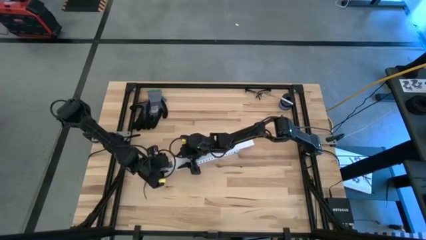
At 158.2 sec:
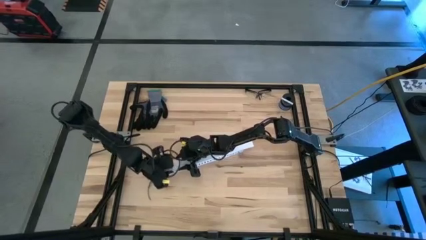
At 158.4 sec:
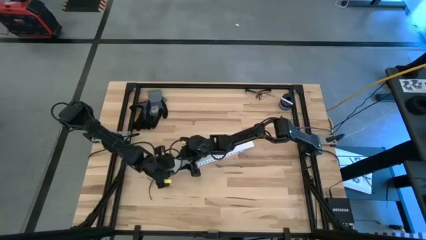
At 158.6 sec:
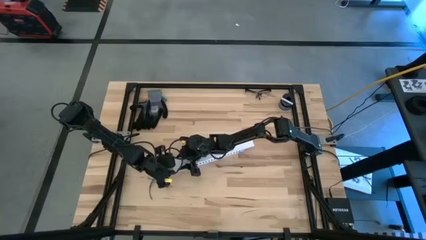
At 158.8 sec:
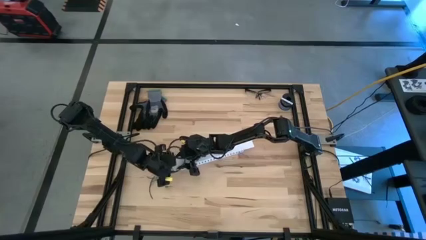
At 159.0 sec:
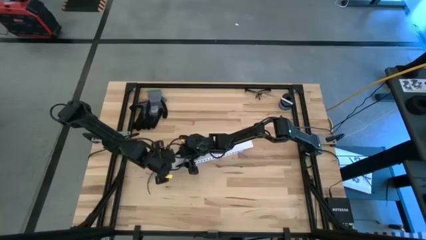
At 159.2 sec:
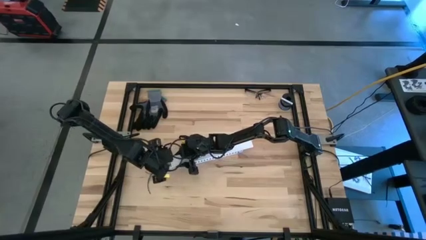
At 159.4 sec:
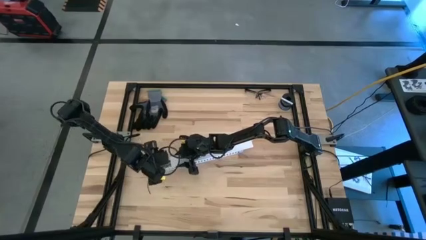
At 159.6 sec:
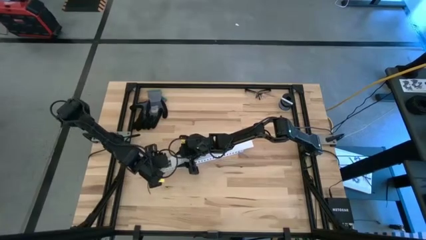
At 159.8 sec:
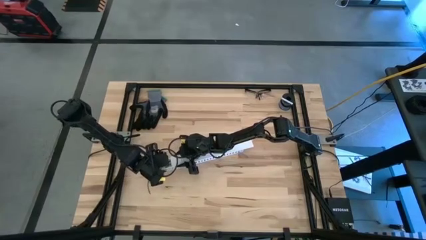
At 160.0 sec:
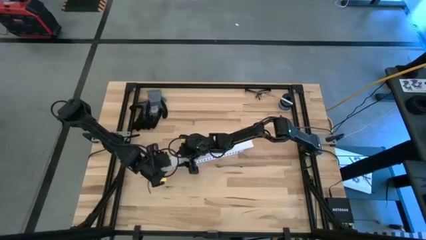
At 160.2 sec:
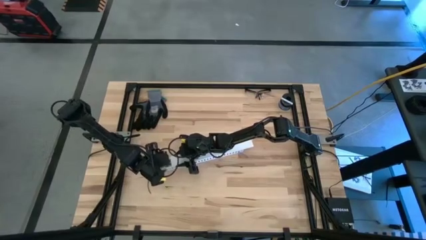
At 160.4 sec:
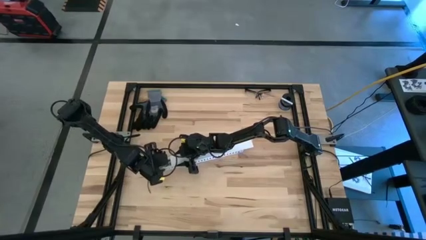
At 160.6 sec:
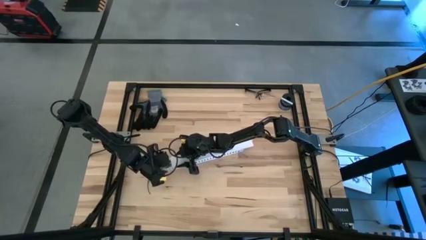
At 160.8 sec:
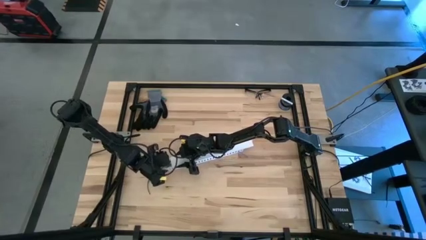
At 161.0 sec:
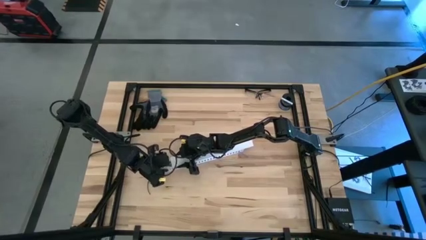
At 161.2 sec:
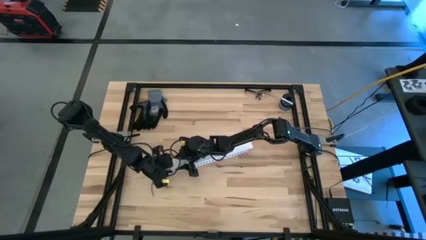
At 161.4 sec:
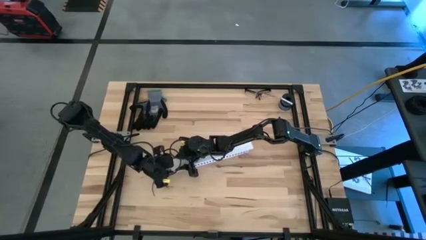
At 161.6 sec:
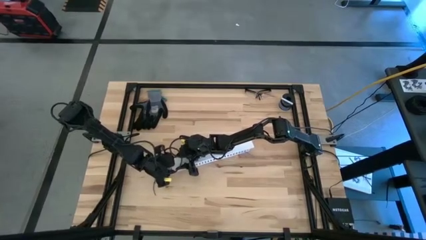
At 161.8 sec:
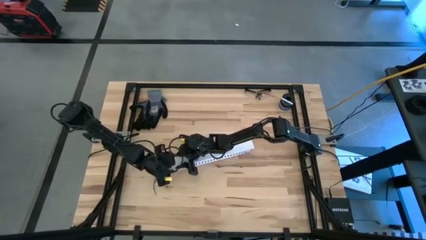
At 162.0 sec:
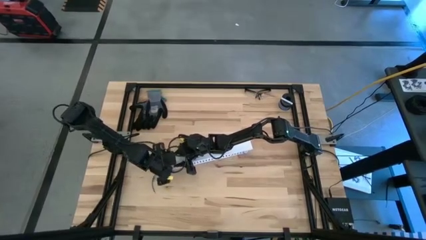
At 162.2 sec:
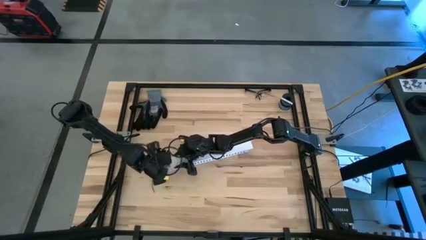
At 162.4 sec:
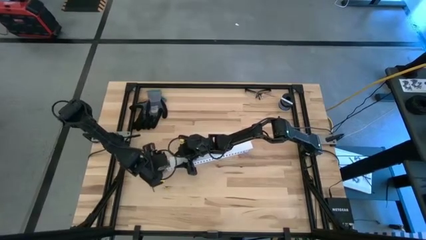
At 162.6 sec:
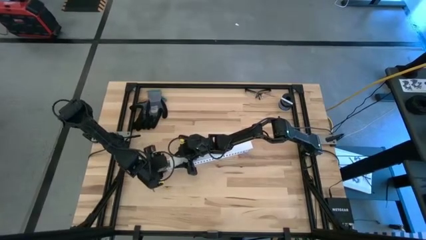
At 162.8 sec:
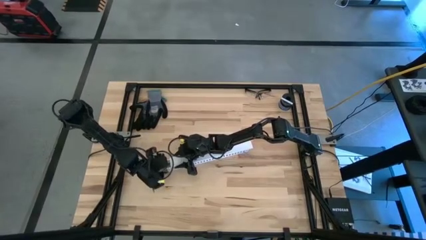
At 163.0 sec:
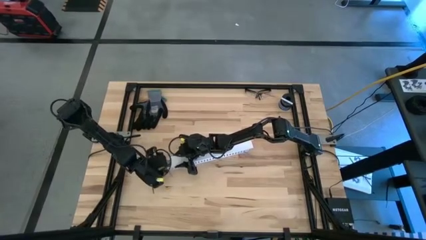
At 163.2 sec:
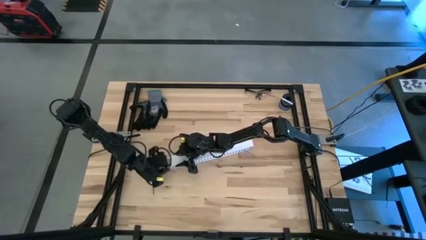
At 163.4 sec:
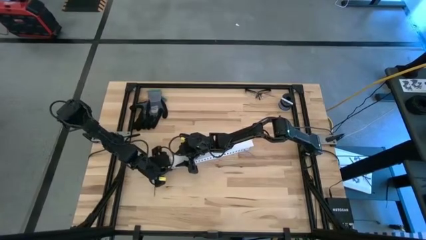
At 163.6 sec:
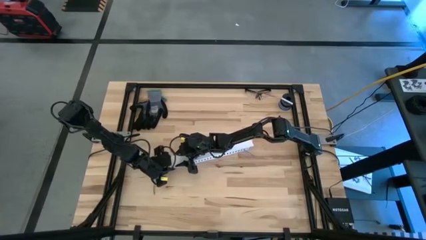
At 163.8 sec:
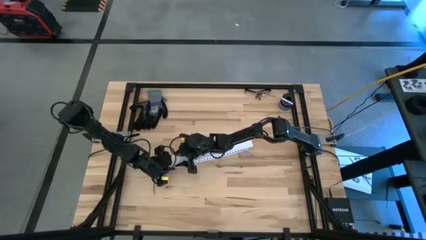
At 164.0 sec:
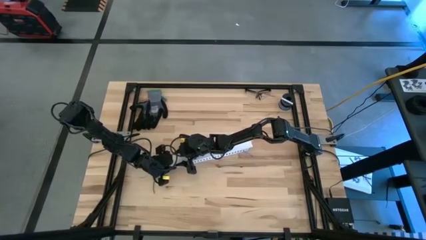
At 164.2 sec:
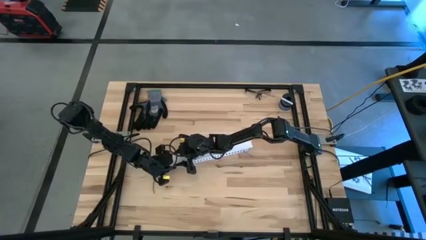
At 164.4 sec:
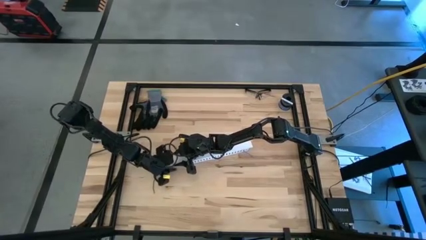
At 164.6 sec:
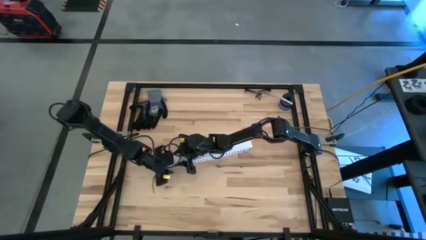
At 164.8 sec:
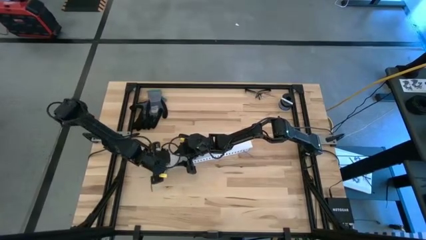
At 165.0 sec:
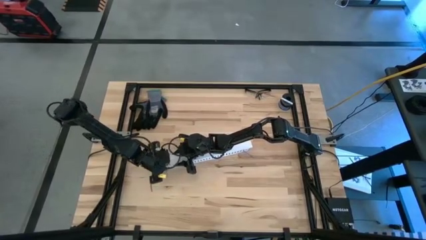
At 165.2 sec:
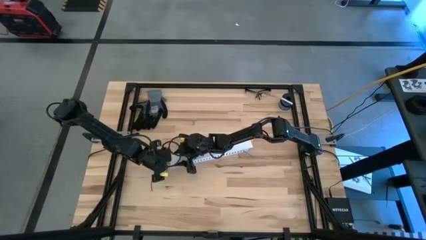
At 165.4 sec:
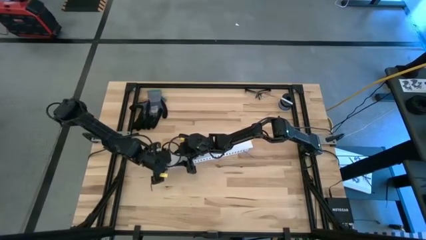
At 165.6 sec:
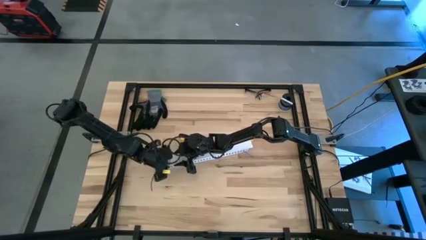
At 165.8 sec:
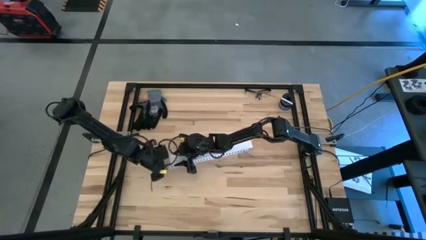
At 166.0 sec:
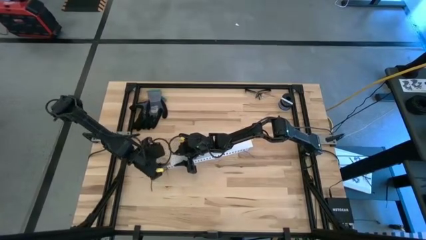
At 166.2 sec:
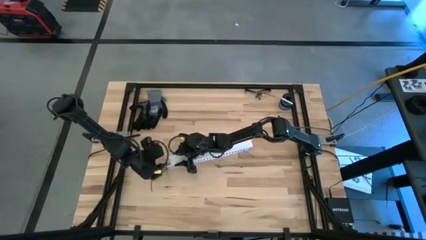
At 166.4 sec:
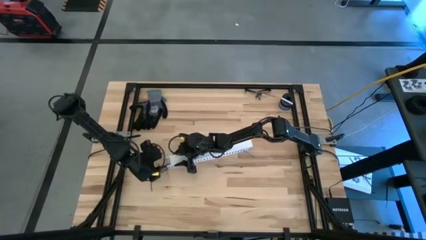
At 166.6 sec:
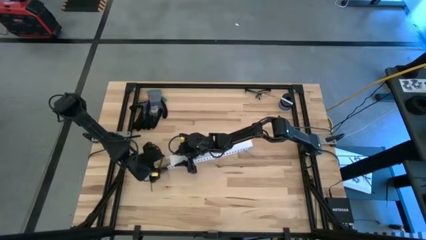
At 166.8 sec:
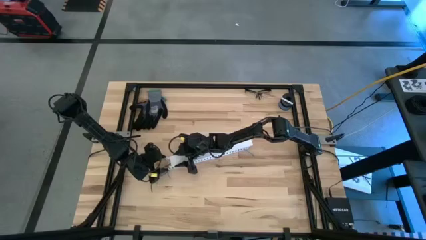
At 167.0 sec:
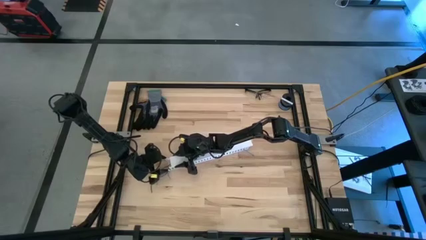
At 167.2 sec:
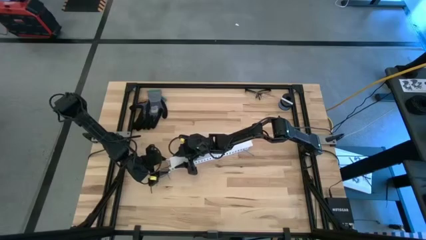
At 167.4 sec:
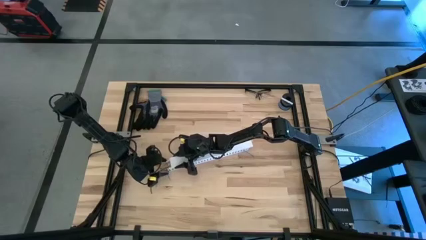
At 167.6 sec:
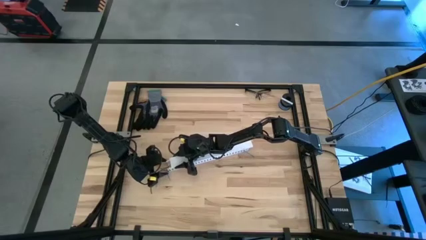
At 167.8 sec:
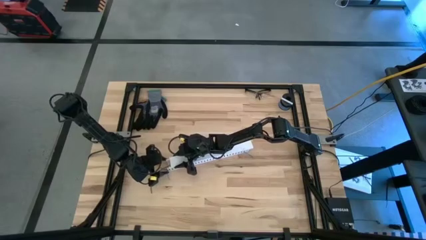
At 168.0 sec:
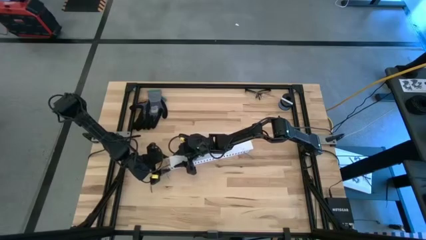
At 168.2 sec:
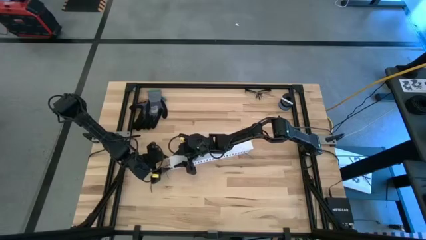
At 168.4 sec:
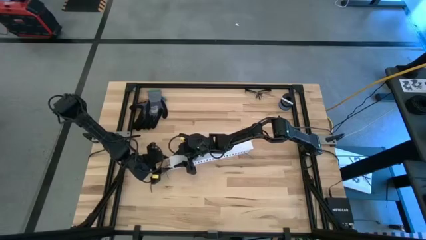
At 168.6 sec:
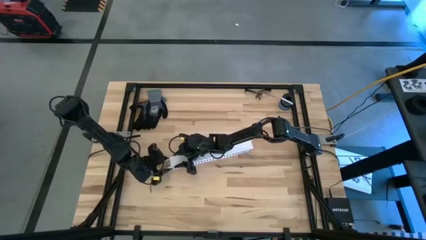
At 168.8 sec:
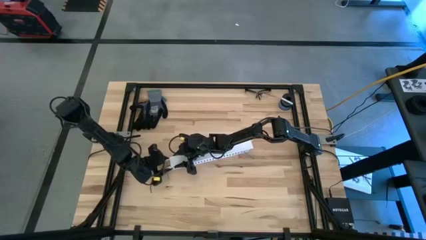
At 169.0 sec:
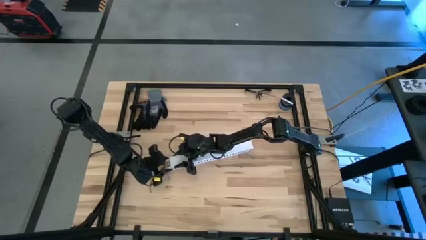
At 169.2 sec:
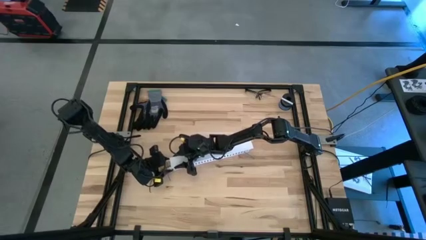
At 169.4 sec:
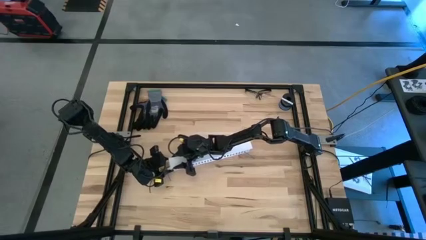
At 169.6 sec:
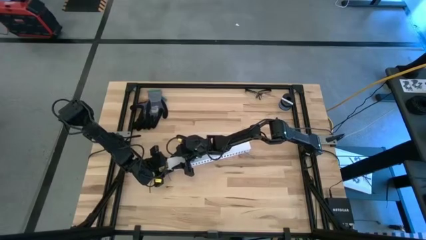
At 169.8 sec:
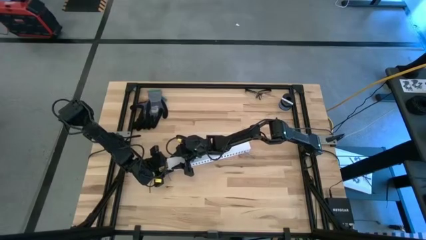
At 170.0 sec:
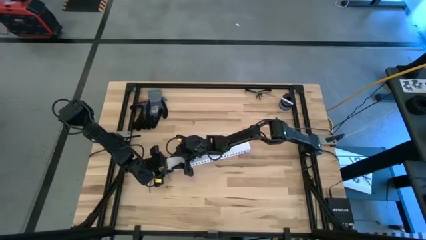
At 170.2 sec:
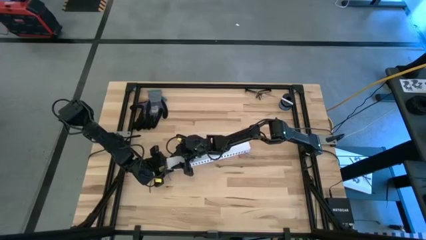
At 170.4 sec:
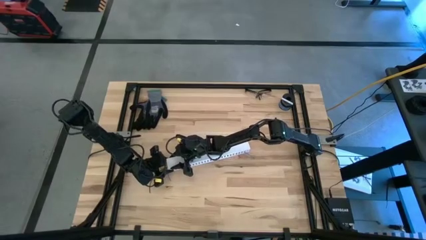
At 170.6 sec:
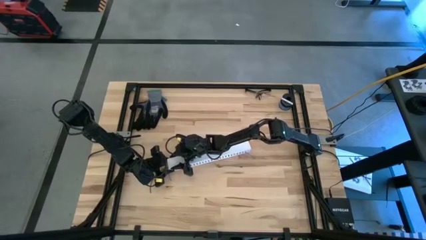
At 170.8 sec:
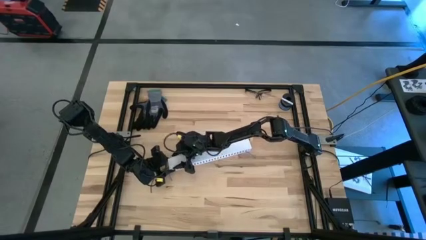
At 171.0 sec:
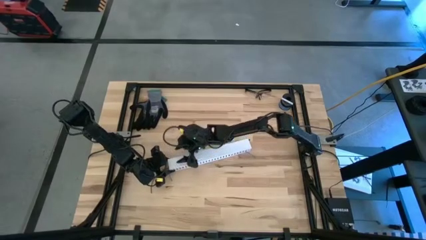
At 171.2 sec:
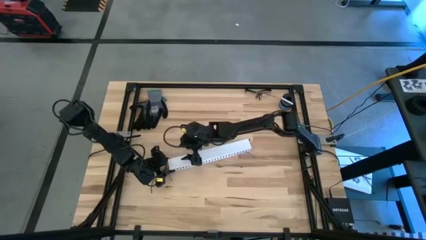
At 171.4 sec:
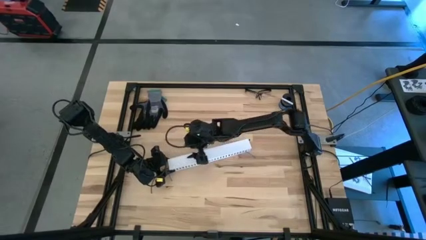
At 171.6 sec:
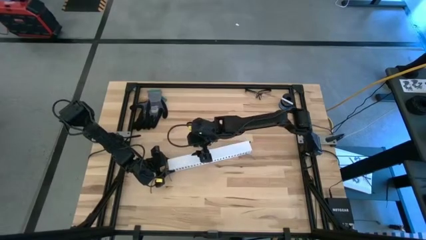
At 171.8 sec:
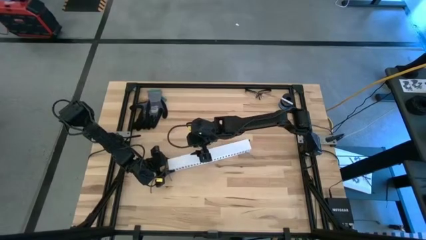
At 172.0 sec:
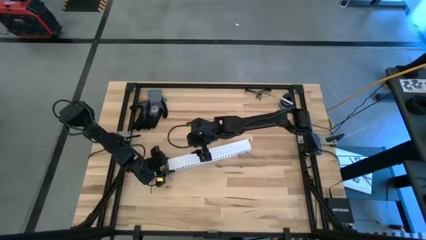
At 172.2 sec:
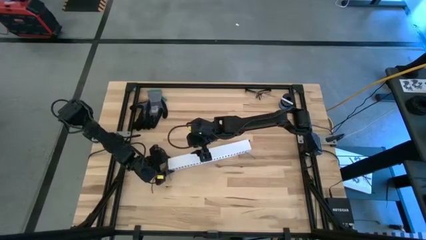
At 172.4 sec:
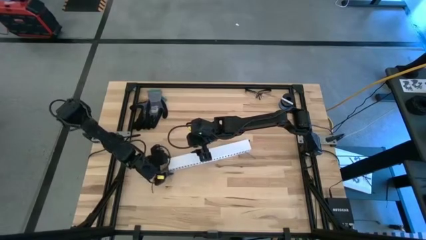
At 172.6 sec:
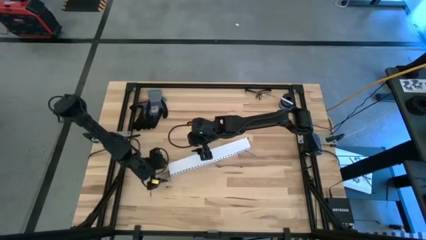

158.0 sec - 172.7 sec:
Task: Ziptie cables
Close the white cable duct

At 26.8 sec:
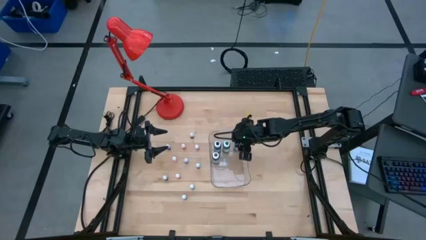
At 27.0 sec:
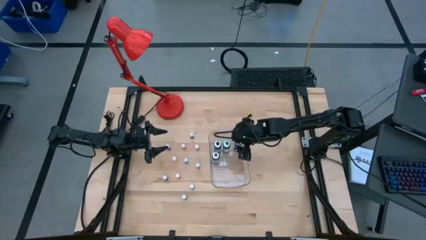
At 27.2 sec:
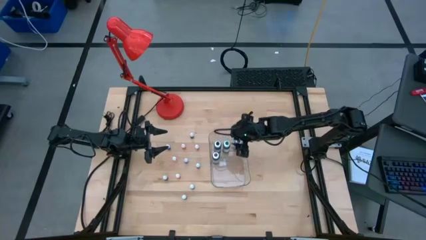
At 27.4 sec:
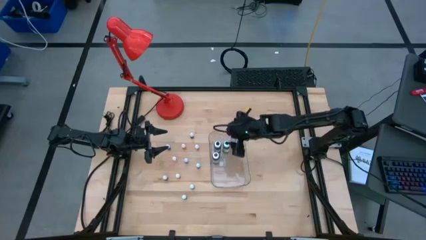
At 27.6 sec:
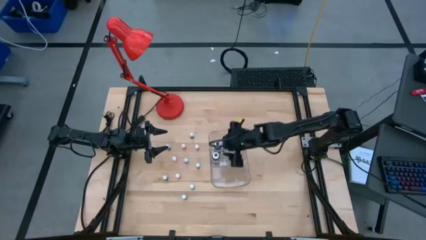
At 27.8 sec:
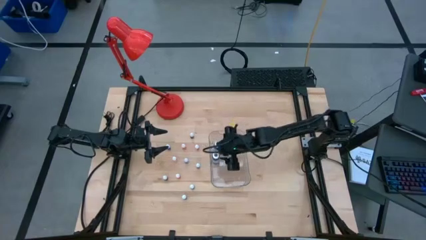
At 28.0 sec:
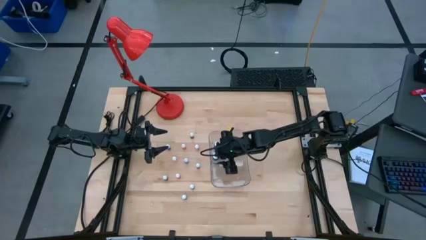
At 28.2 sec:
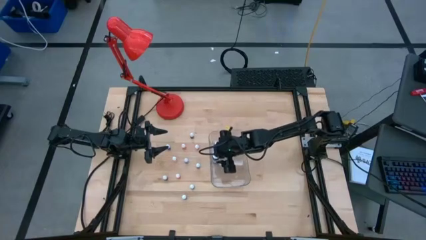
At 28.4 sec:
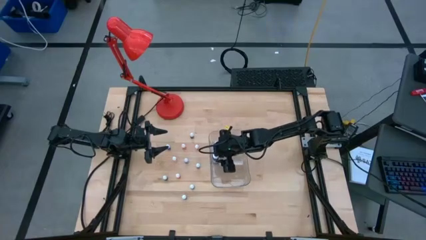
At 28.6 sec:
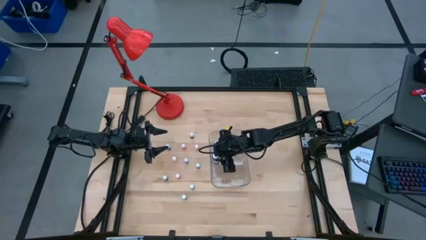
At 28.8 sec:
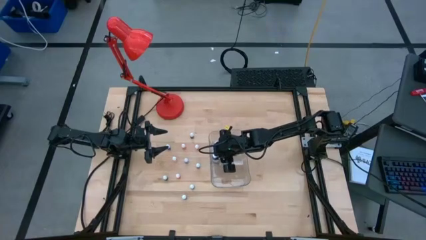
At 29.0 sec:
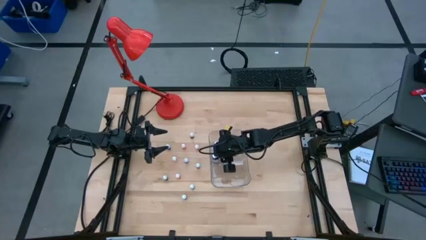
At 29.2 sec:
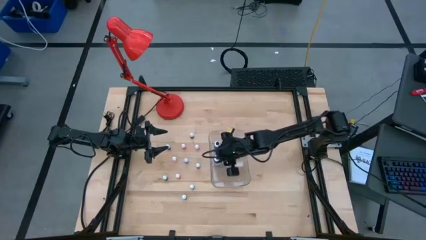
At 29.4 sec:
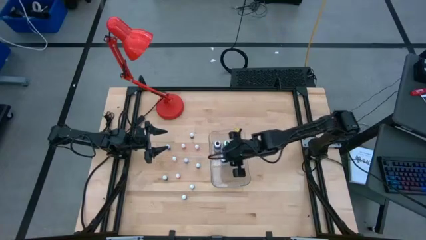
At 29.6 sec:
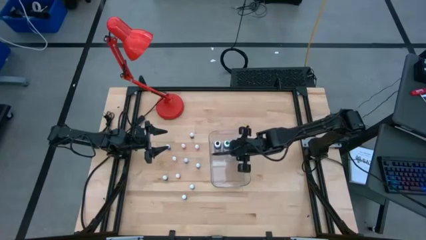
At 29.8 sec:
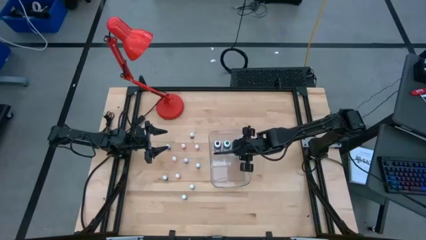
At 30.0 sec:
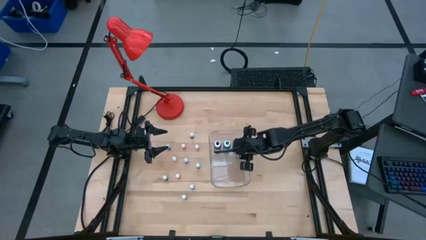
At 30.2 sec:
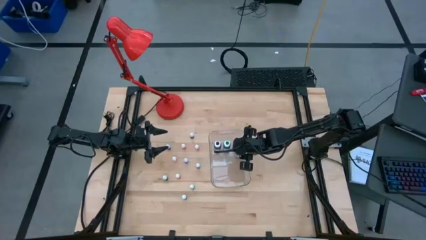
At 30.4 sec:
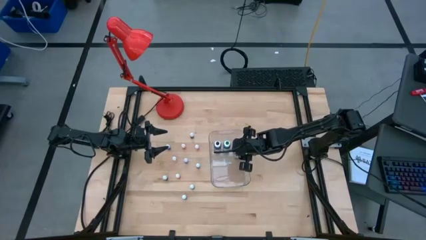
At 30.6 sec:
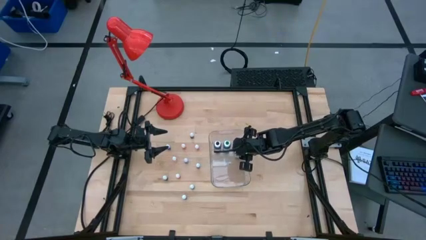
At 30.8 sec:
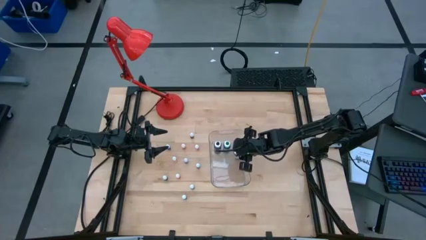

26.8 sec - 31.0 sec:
Task: Pick & Place food coloring
Move the purple food coloring bottle beside the blue food coloring bottle in the container
